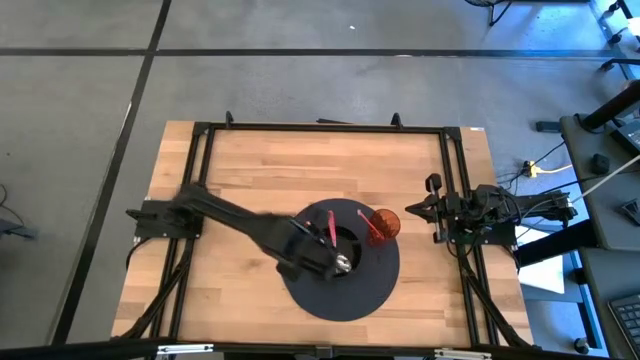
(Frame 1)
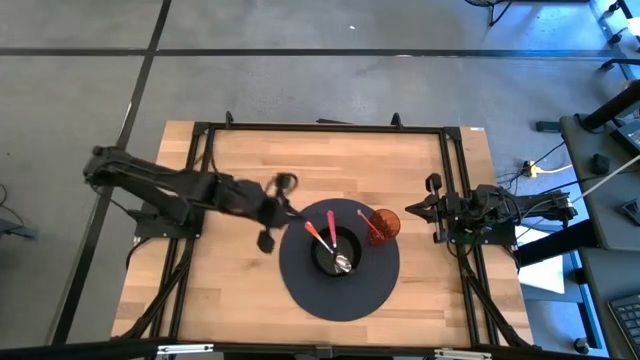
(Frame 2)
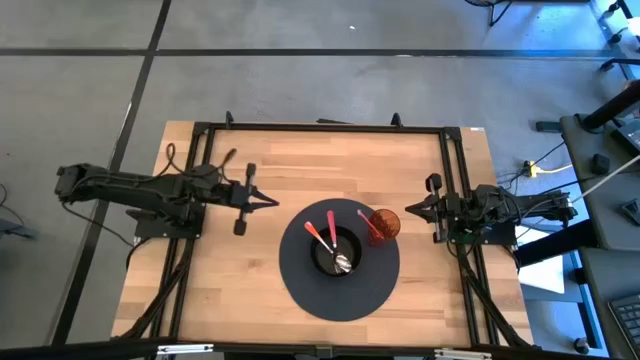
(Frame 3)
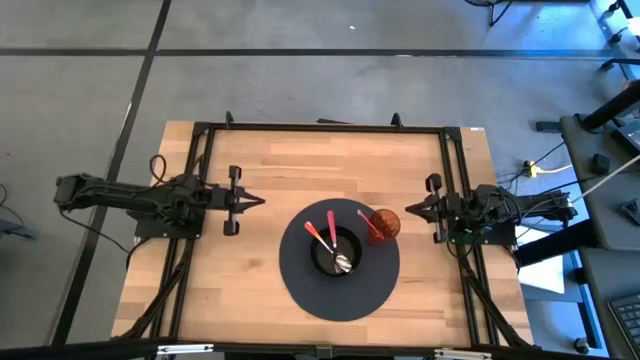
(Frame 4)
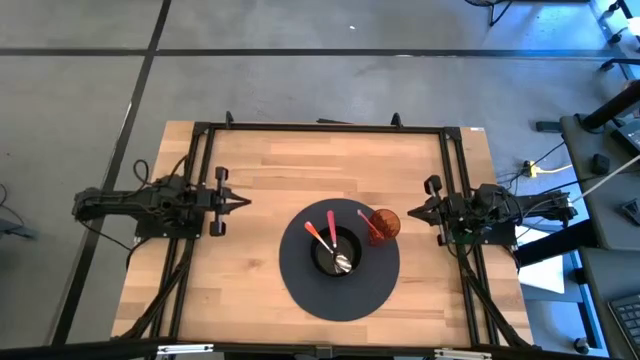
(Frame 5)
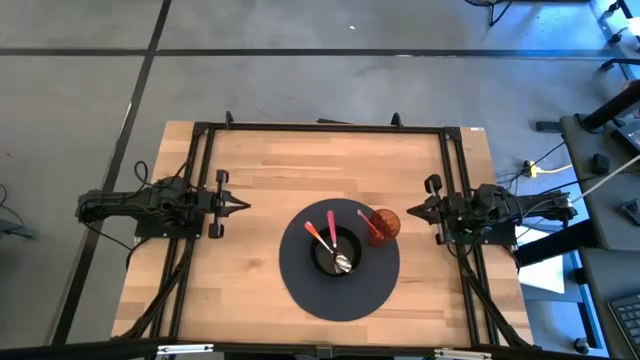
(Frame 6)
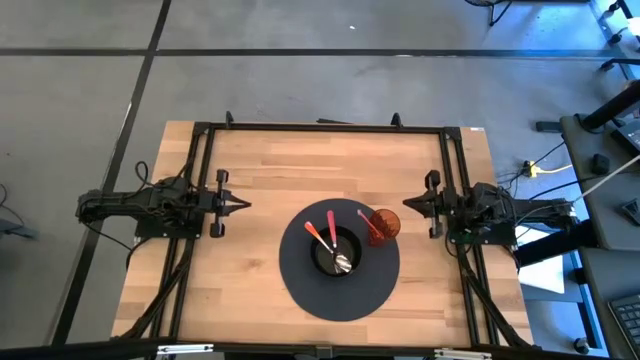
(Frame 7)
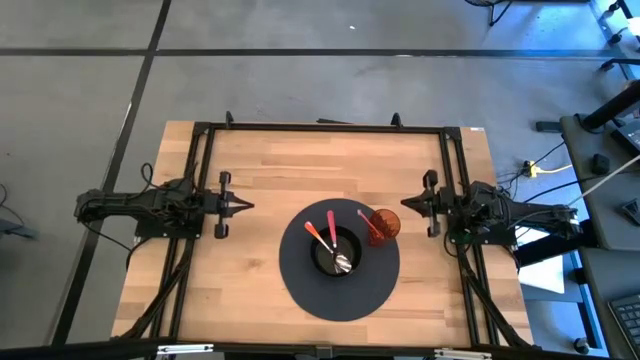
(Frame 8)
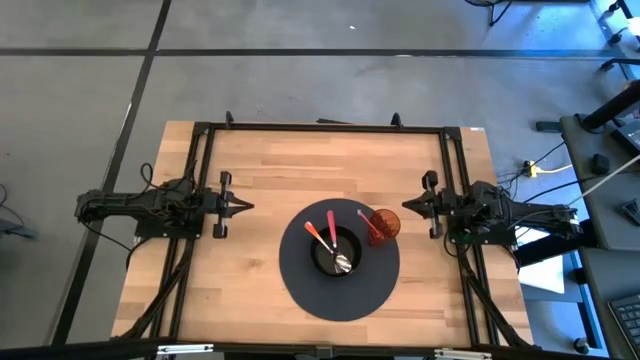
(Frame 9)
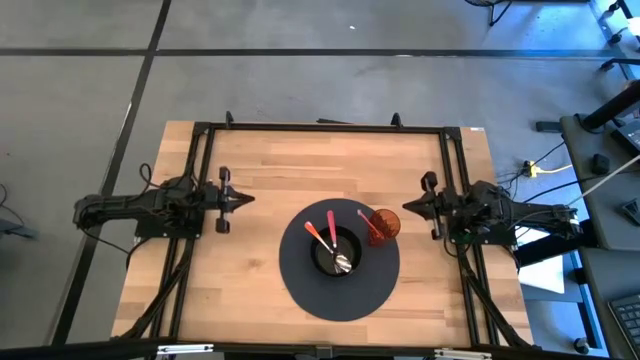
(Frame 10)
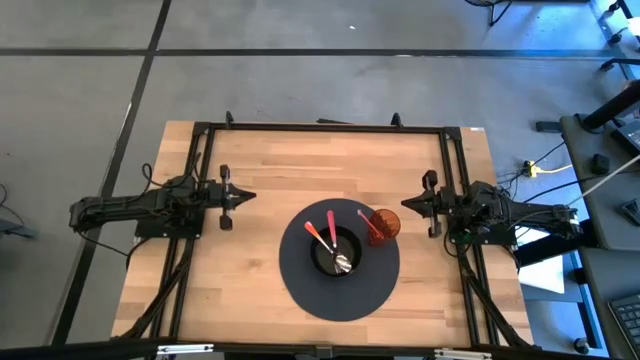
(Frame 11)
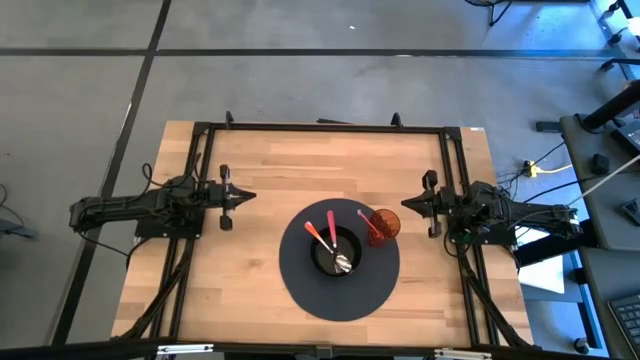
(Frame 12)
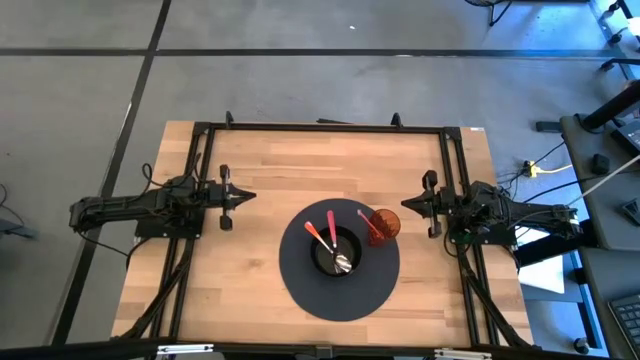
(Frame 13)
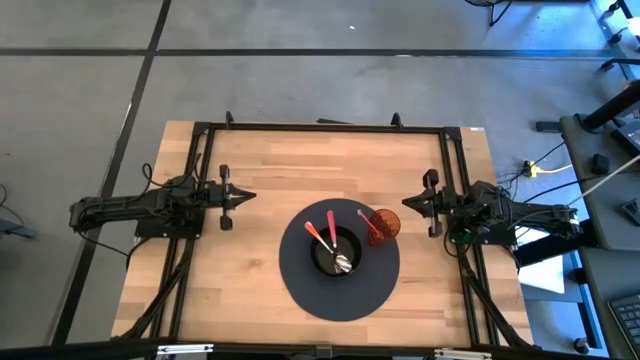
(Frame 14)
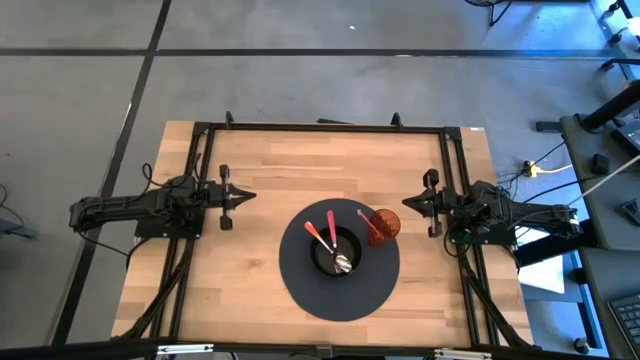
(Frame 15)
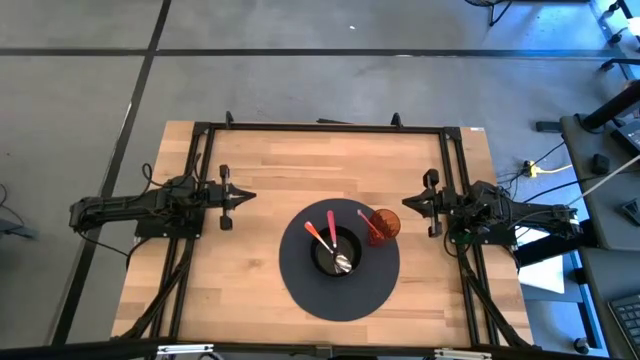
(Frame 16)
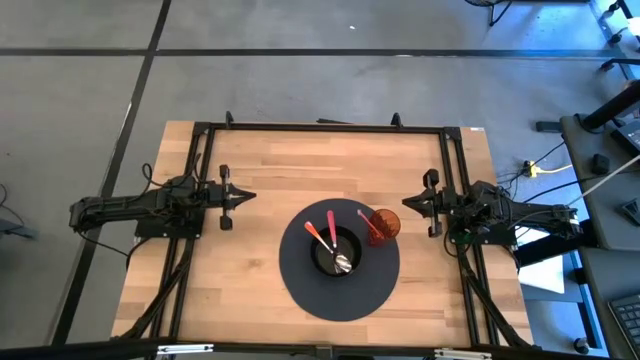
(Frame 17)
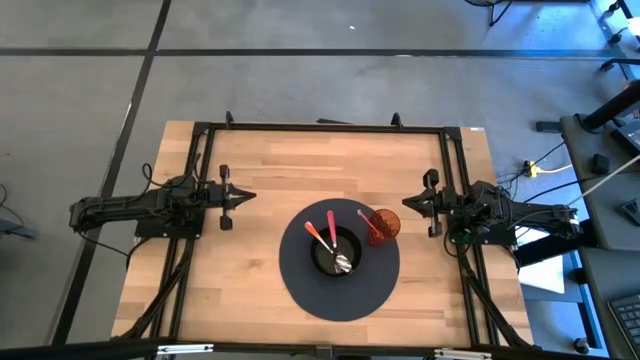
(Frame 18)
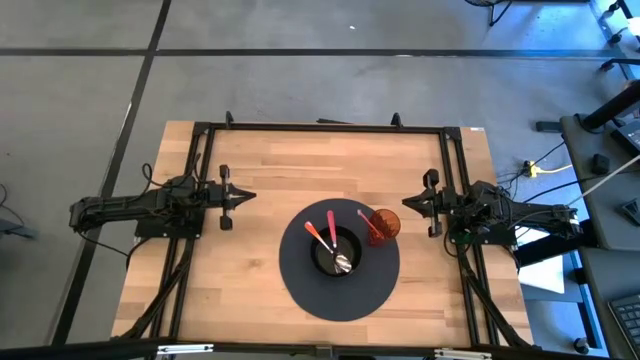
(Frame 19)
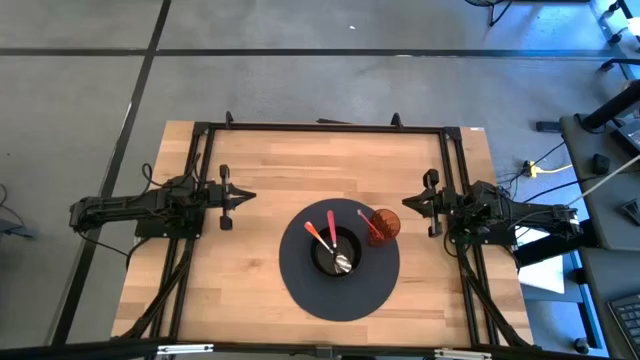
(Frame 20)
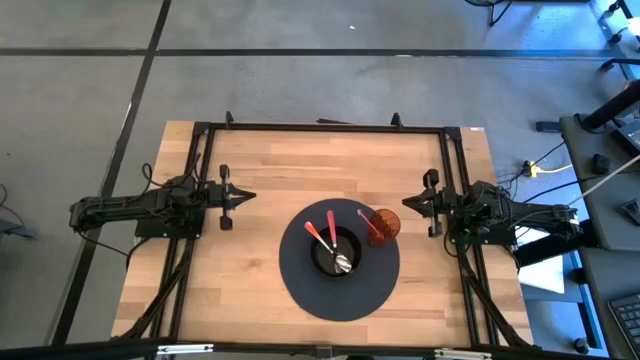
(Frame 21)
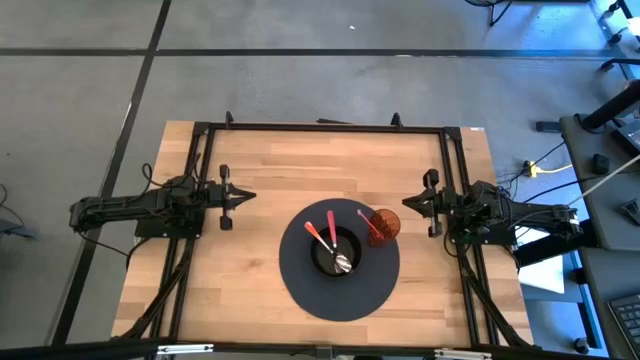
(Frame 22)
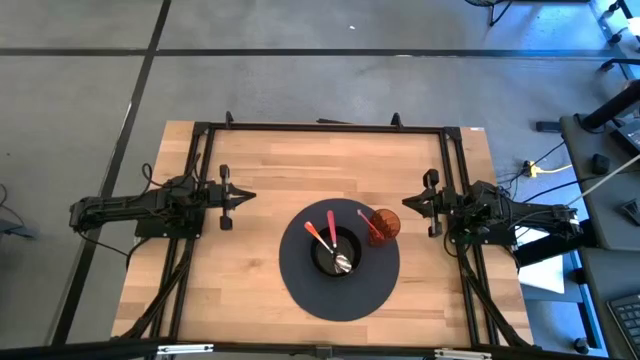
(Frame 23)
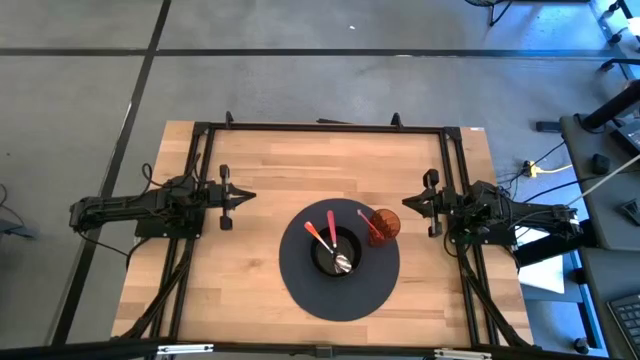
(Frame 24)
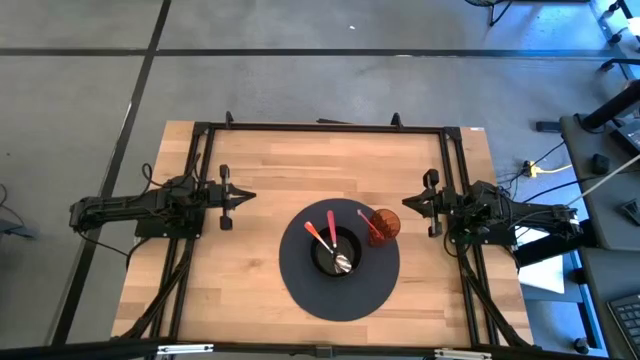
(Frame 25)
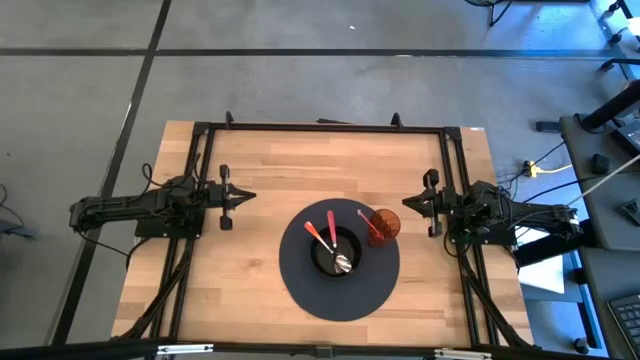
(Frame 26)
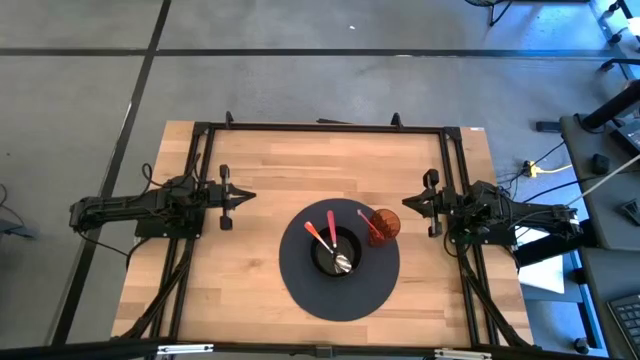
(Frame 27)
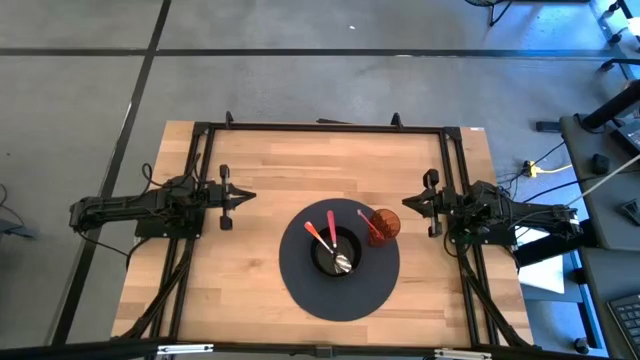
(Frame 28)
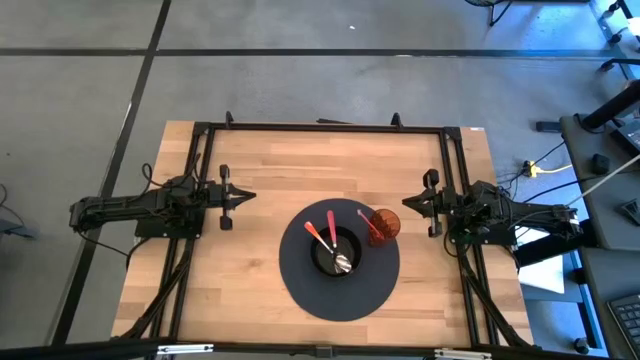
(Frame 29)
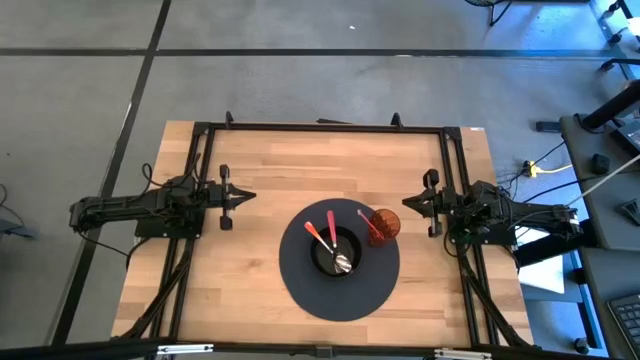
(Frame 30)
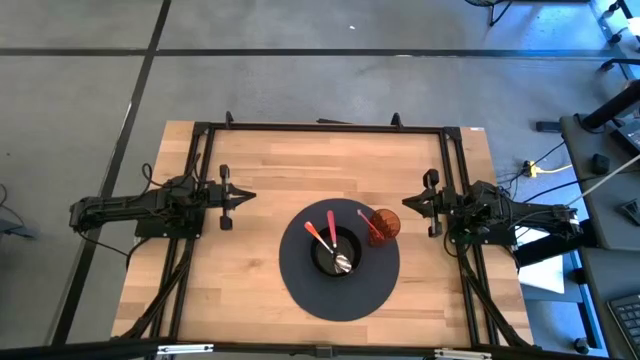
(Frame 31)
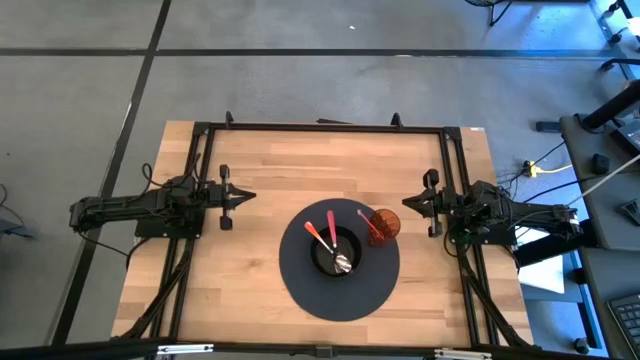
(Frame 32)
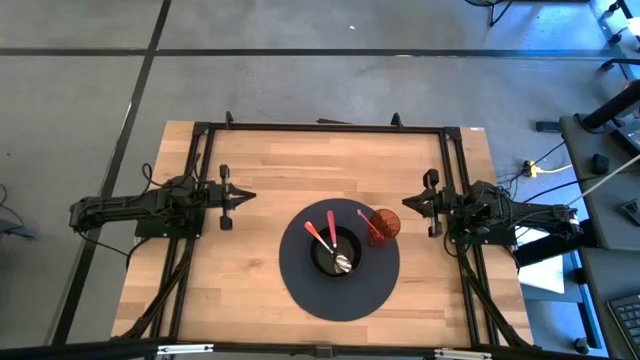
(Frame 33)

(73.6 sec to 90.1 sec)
Task: Pick & Place Utensil
Return to Home Position

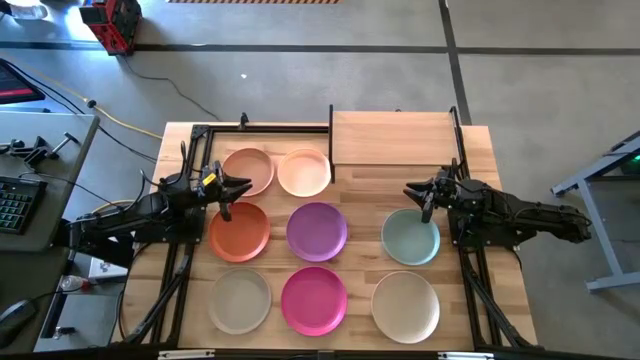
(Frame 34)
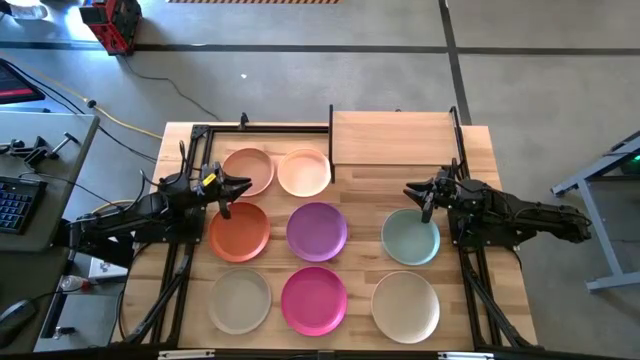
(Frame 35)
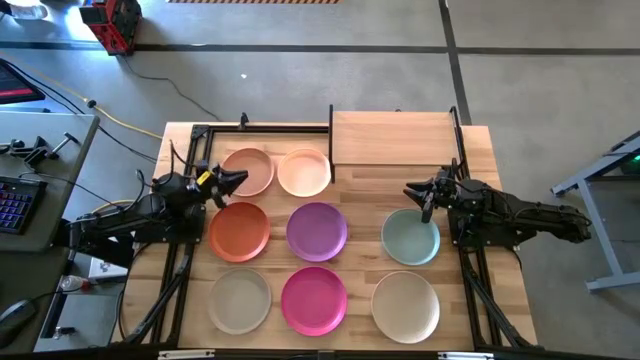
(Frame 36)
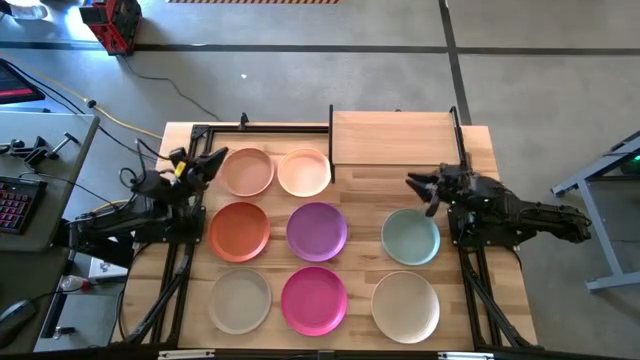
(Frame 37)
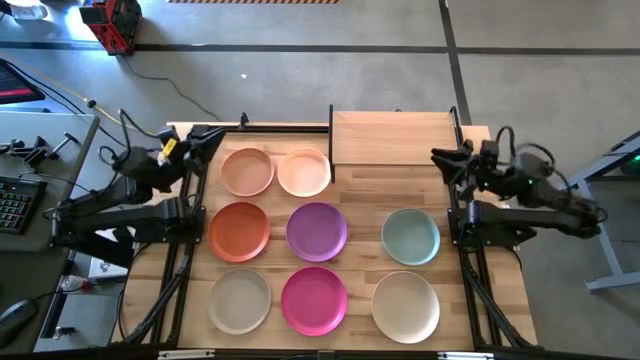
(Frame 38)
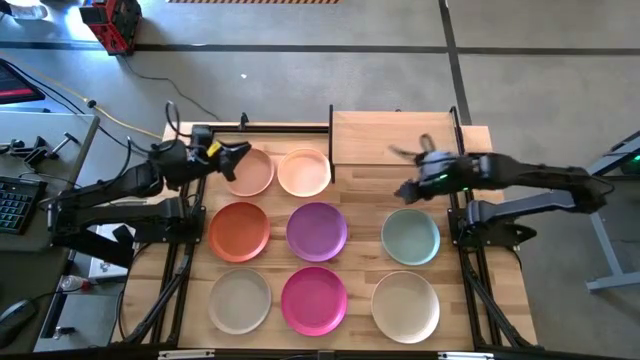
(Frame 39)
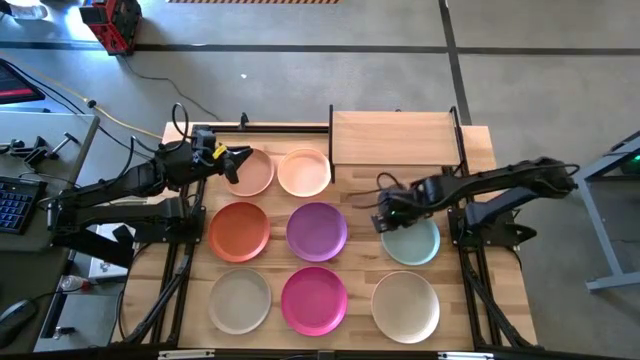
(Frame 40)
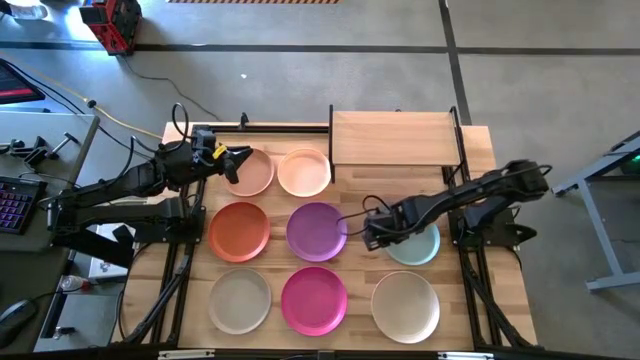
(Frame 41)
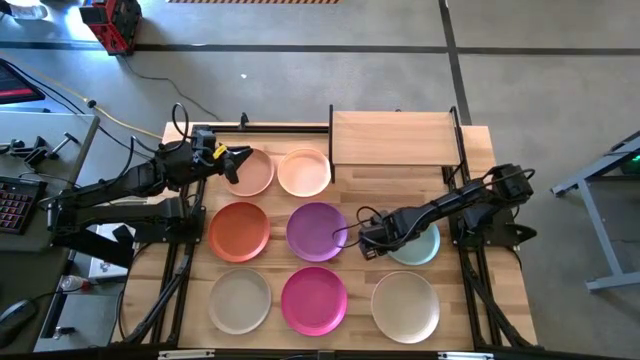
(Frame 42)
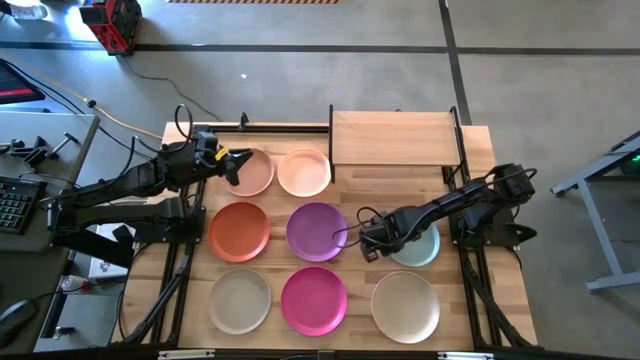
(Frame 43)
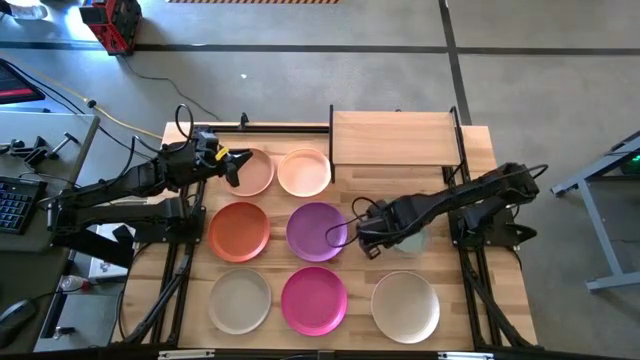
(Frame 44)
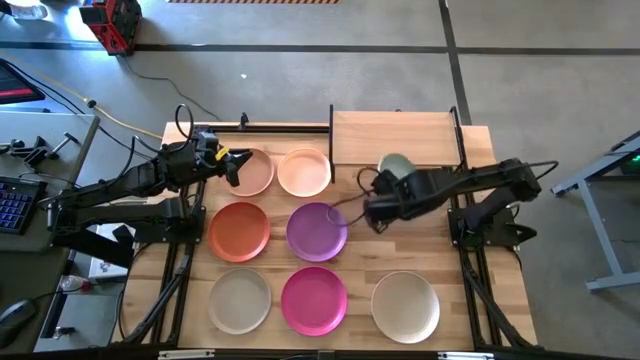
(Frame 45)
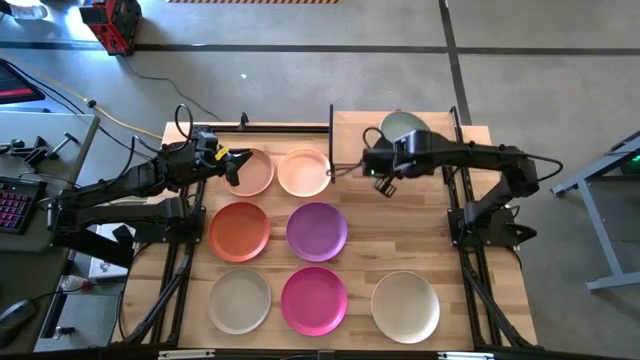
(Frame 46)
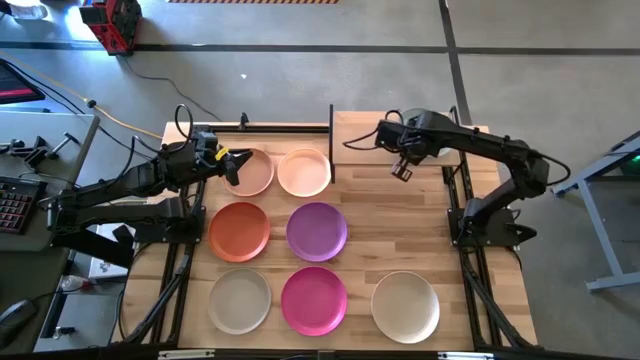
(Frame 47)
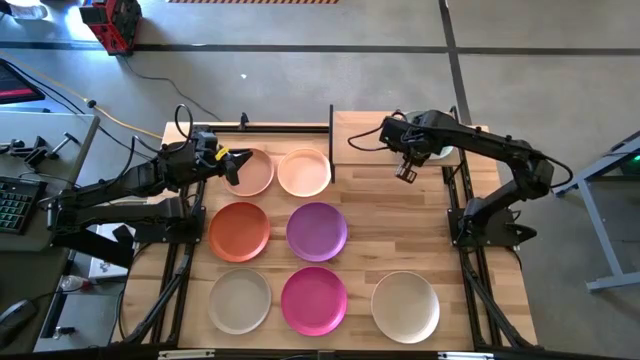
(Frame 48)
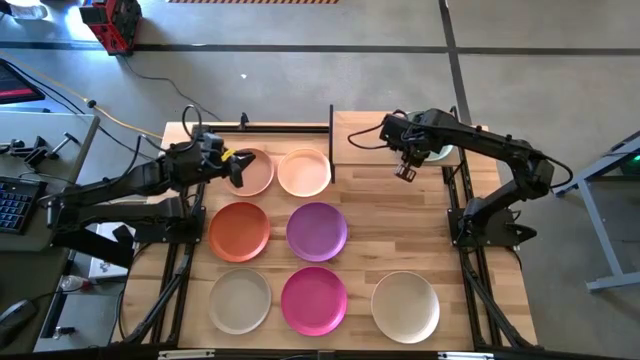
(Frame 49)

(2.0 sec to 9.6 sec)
Task: Place and stack plates onto a shelf
Put the blue plate on the shelf
